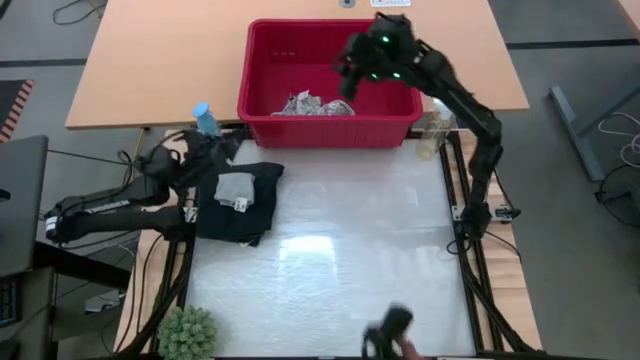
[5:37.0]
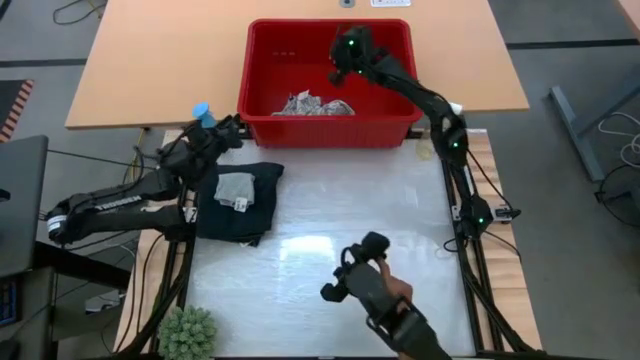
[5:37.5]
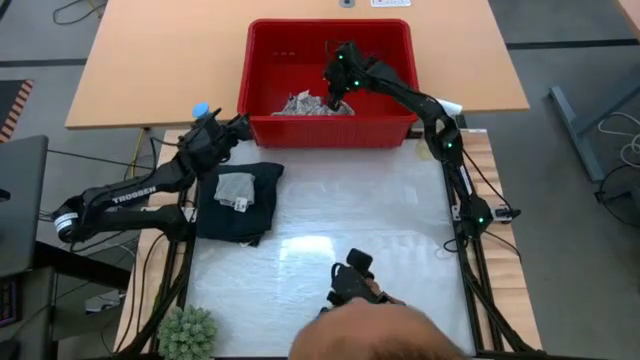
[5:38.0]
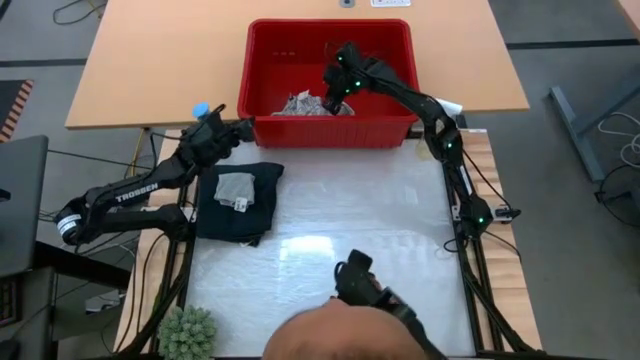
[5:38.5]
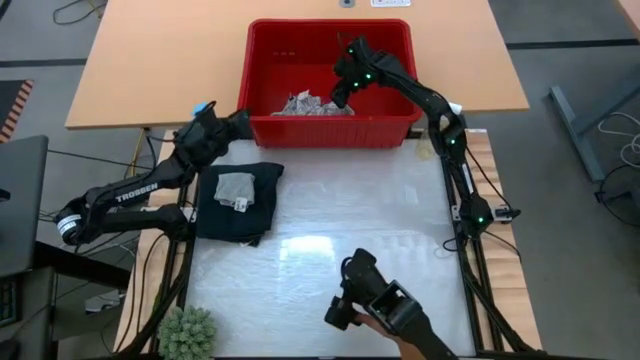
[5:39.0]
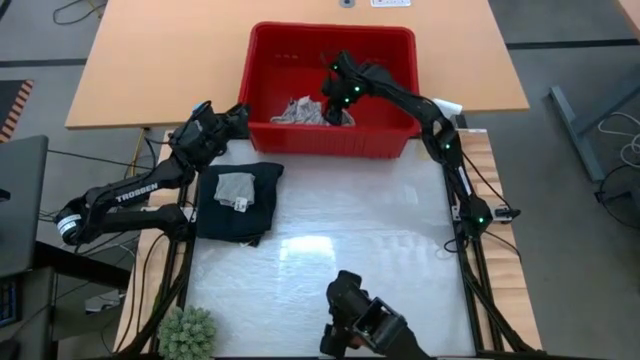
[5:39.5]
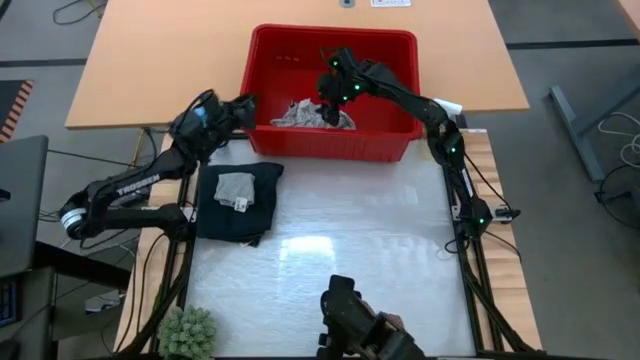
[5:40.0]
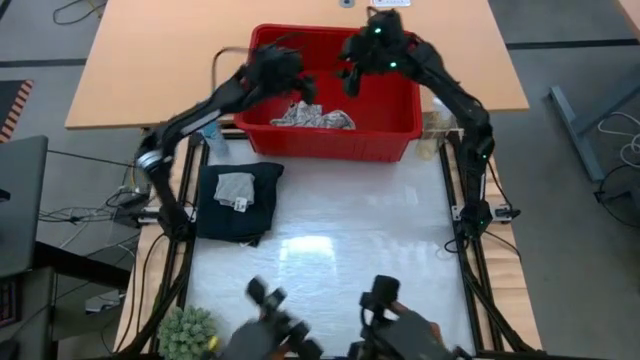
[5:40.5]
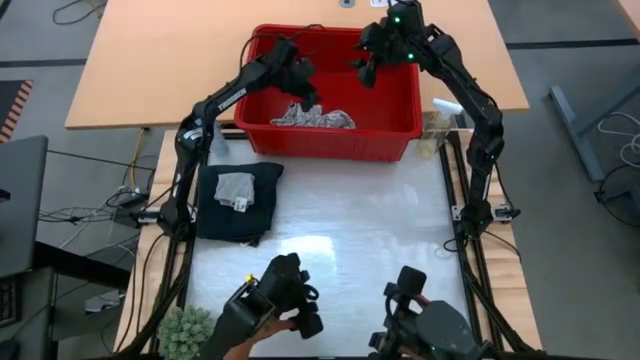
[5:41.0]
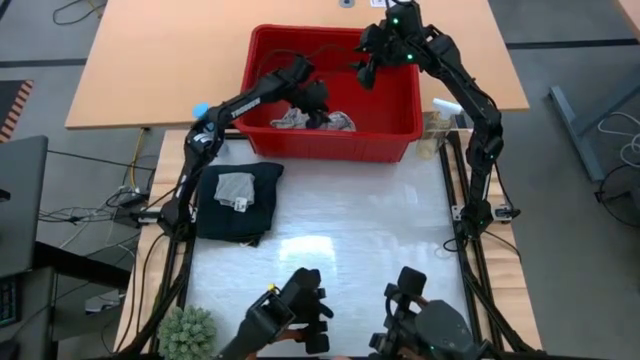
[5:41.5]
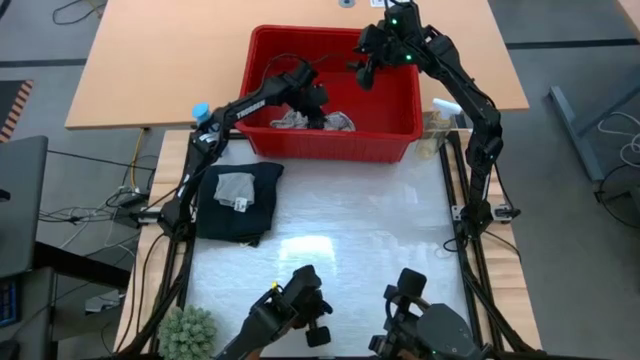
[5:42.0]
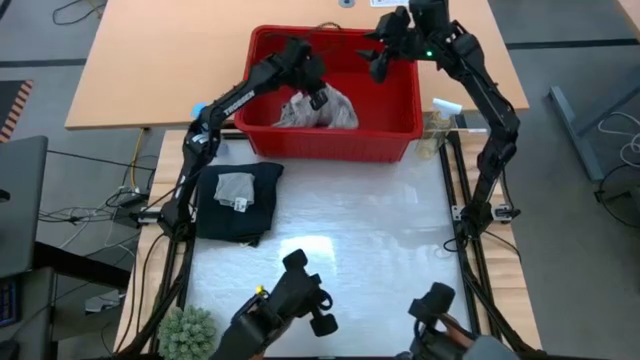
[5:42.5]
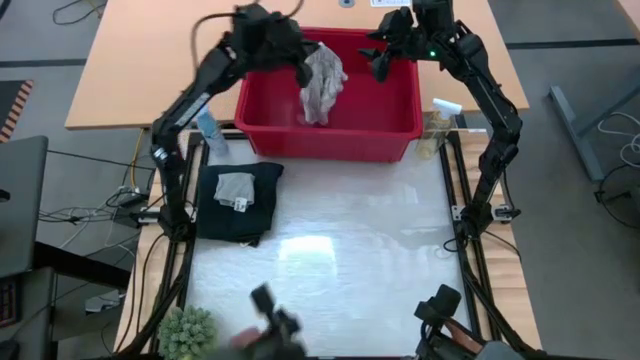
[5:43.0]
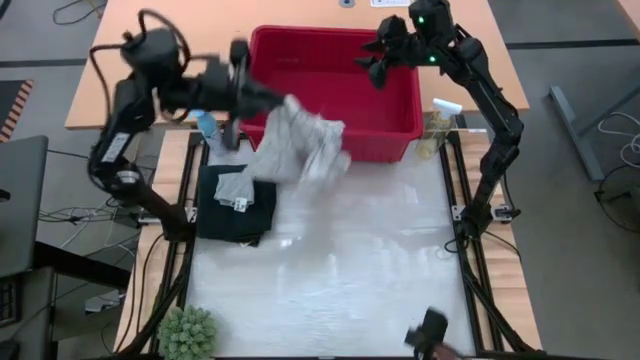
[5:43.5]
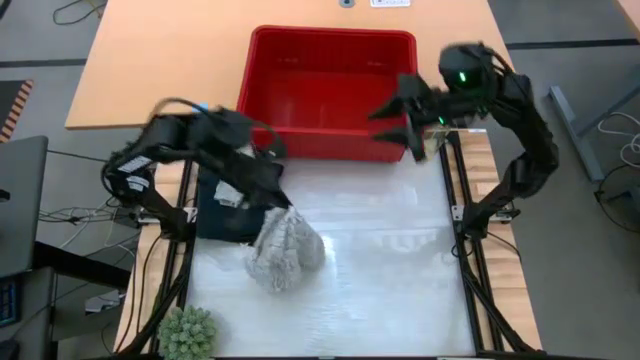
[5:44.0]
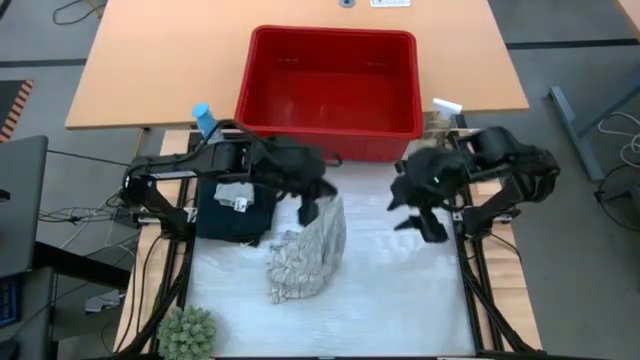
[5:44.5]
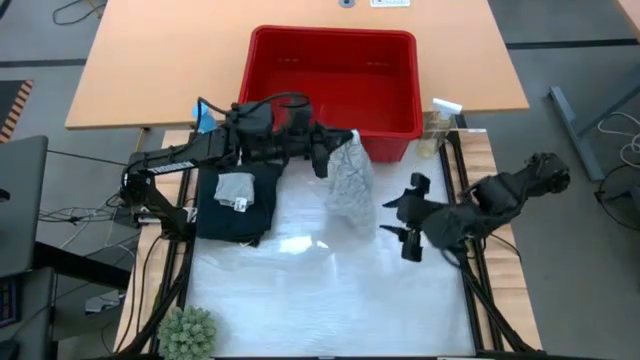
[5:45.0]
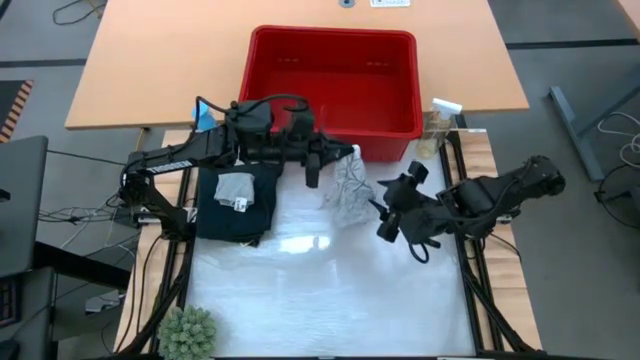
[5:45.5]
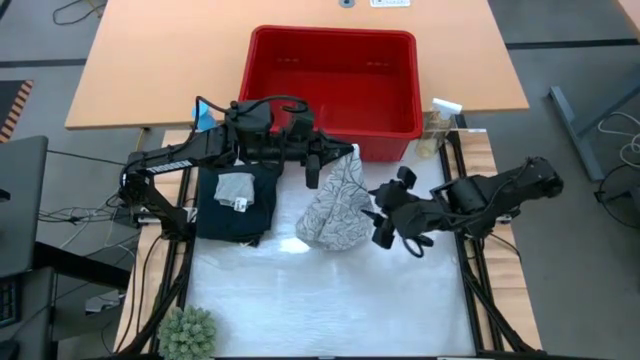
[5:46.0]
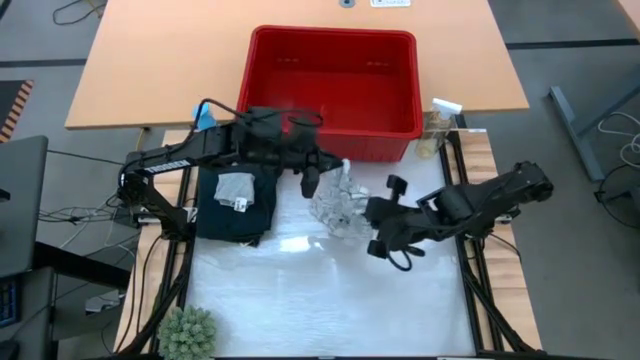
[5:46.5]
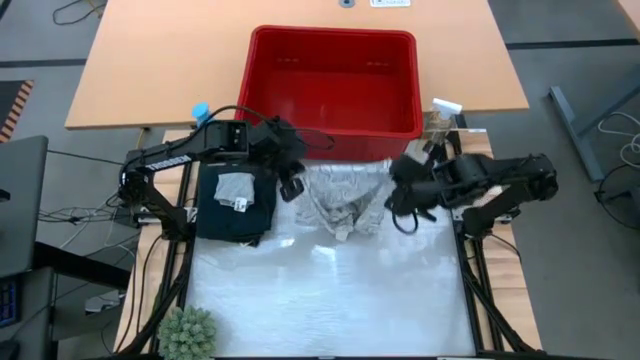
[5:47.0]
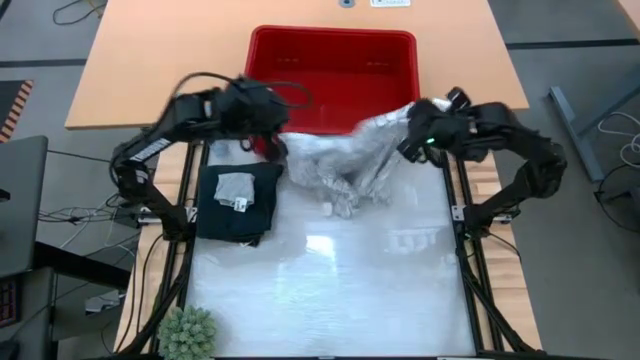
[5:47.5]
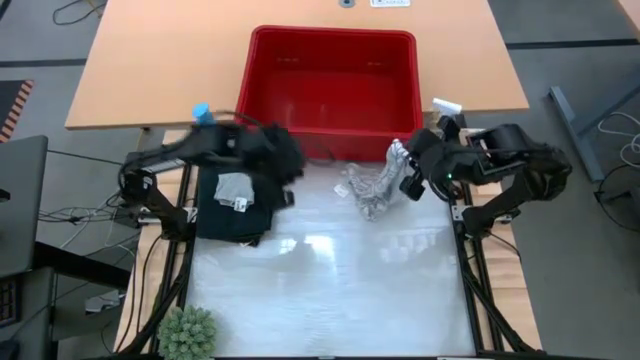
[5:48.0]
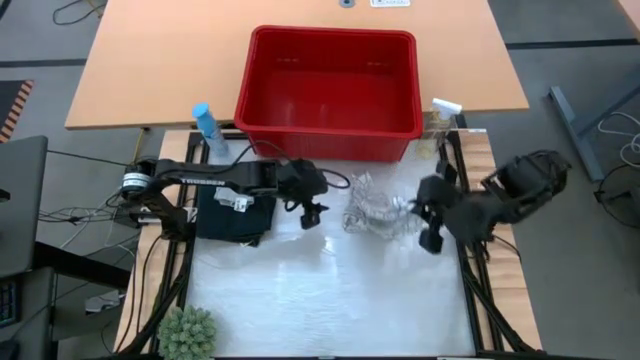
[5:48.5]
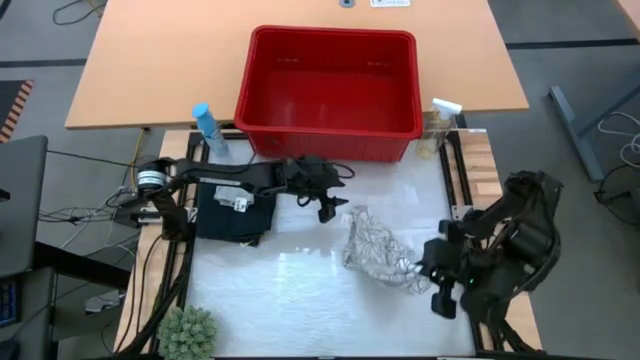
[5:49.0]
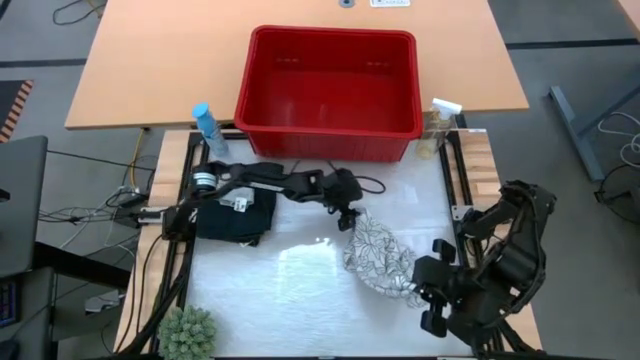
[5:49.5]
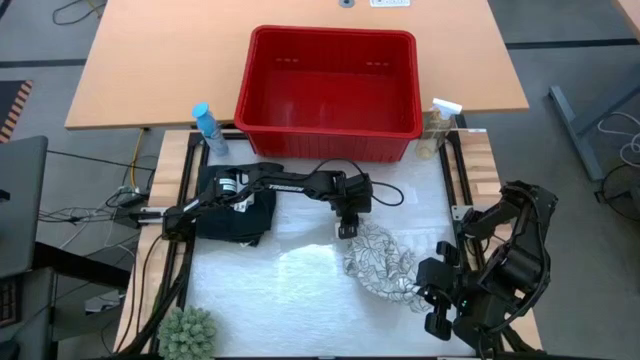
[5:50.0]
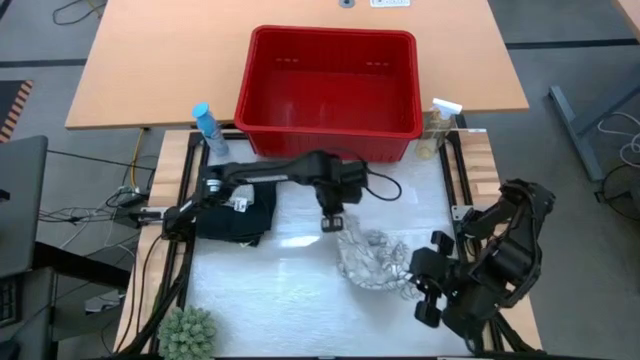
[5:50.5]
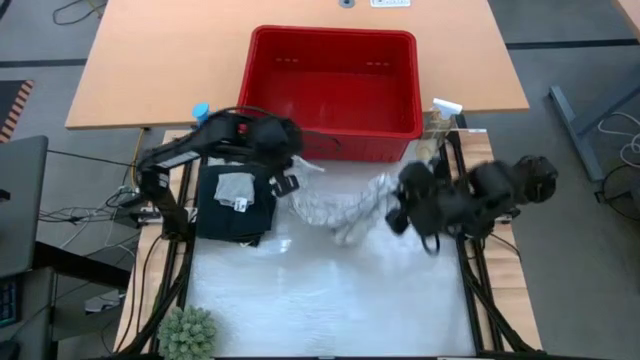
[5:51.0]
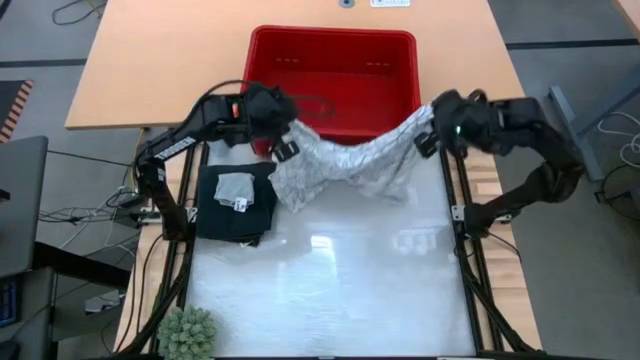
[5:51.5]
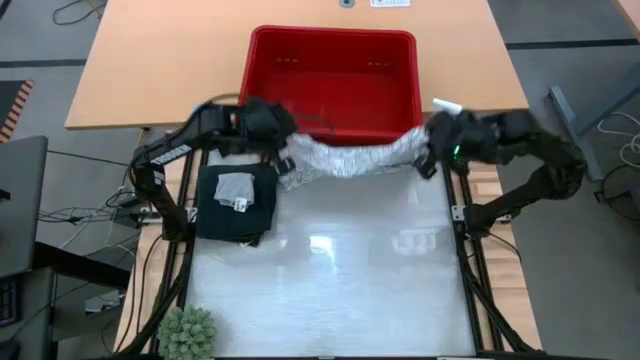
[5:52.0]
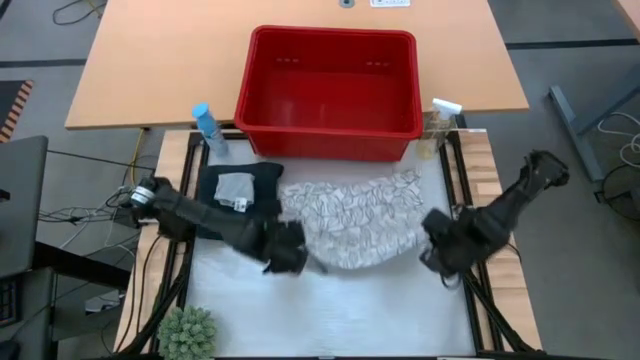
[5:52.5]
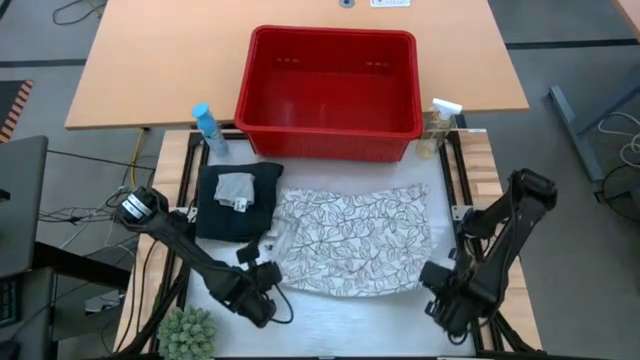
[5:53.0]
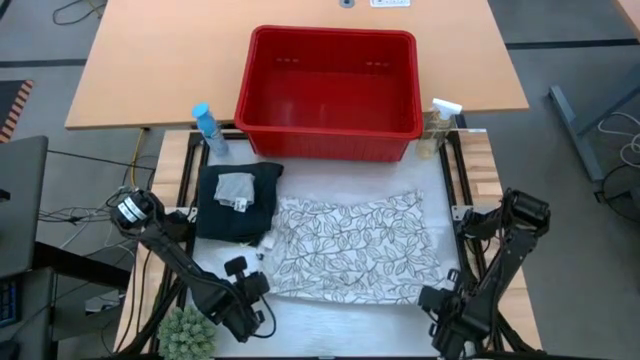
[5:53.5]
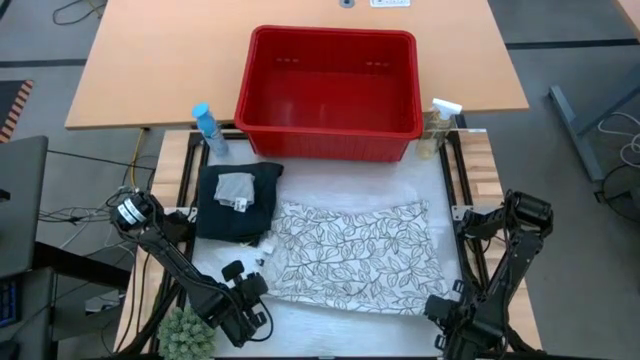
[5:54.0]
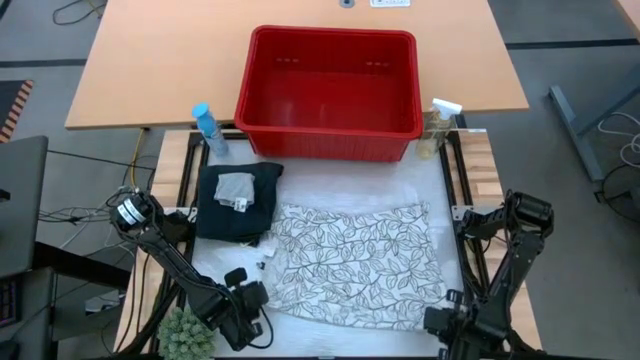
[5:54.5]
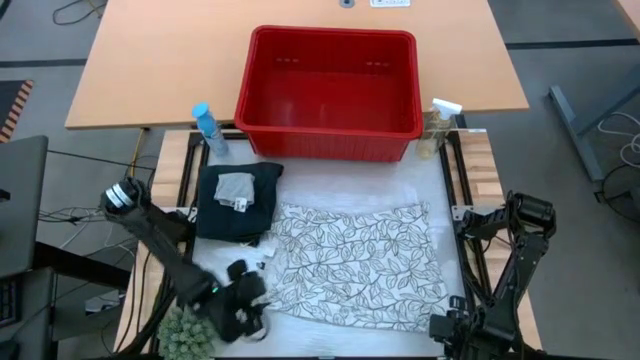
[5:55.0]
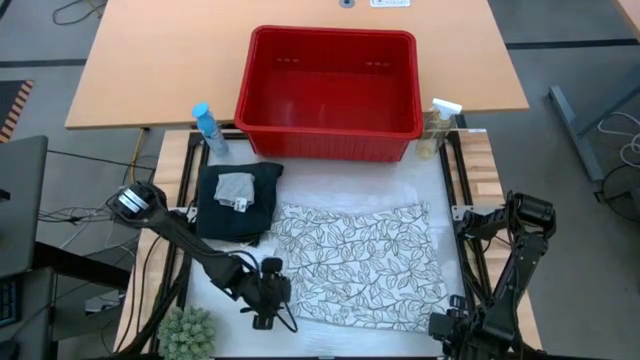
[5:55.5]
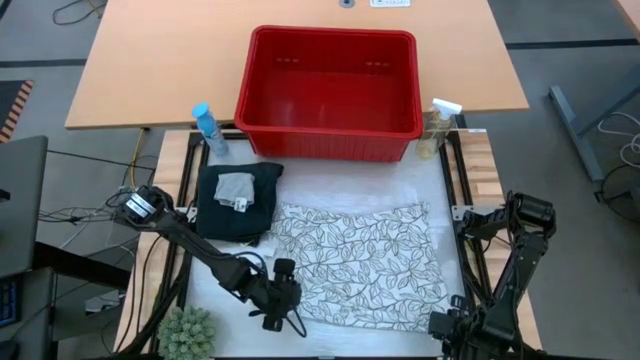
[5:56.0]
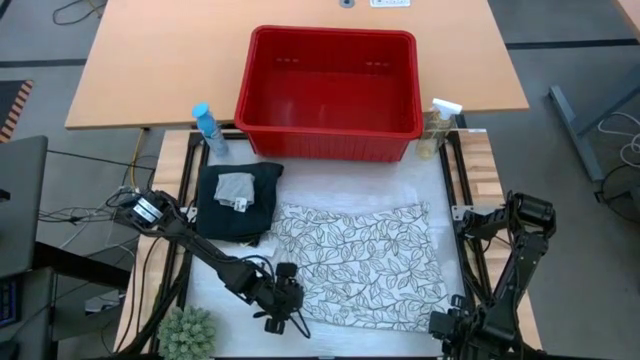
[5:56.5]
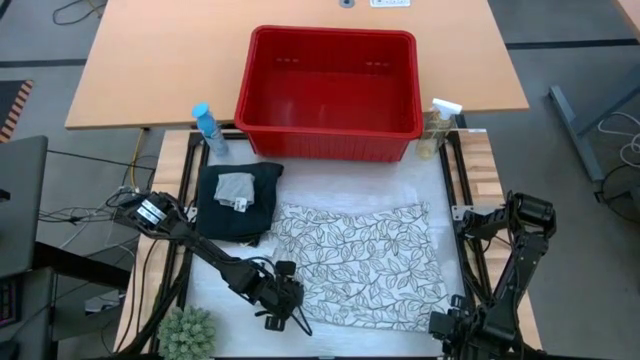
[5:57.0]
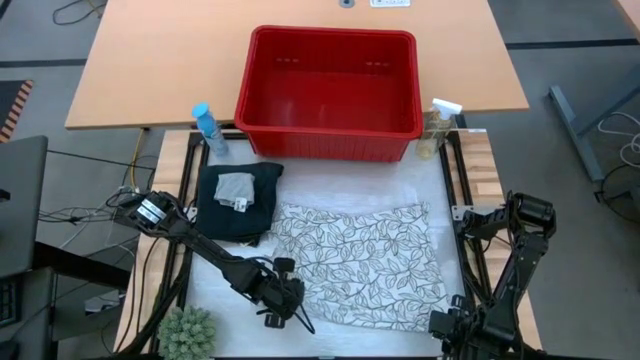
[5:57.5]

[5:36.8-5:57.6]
Task: Fold Laundry from Bin
Fold the white patterned shirt
